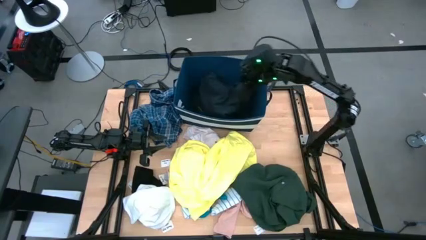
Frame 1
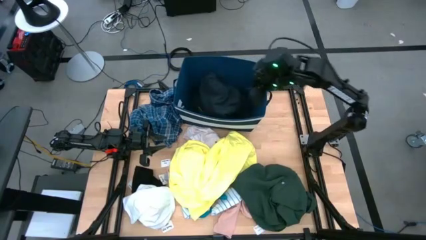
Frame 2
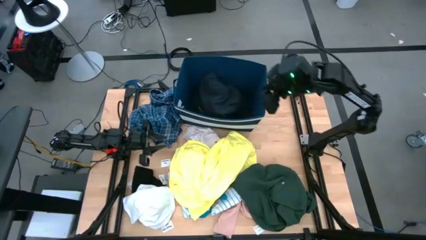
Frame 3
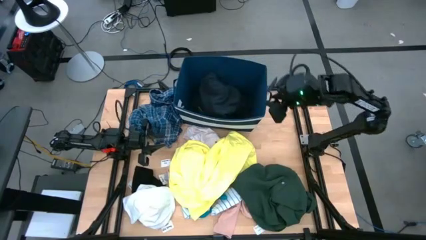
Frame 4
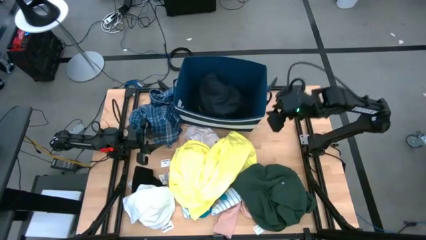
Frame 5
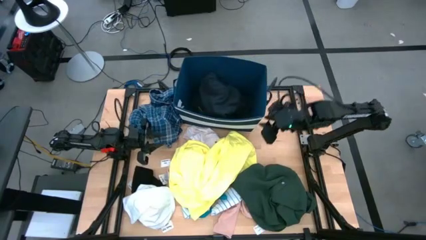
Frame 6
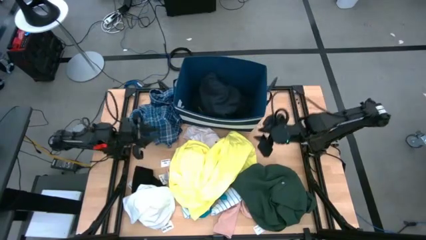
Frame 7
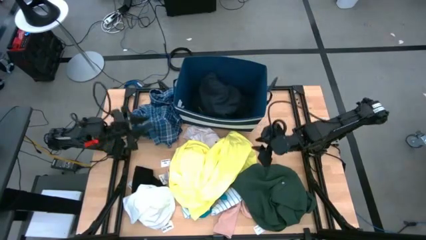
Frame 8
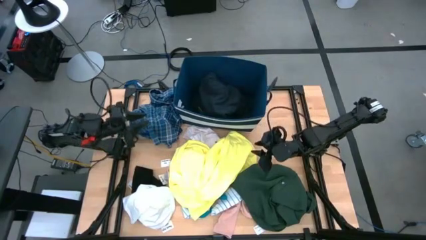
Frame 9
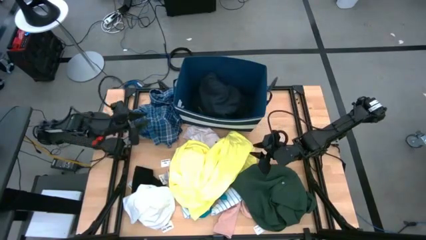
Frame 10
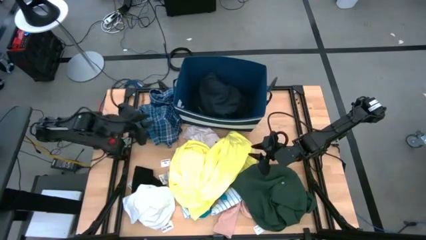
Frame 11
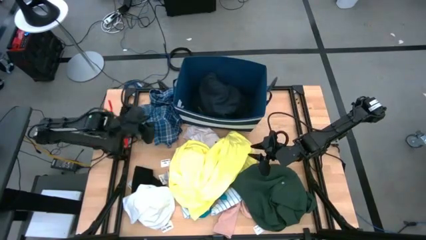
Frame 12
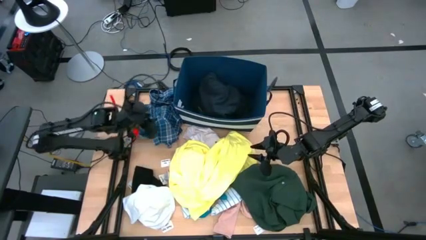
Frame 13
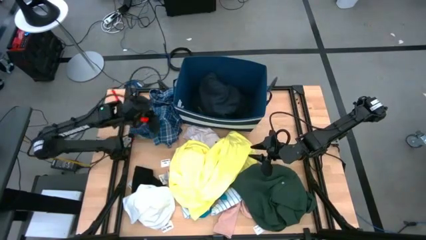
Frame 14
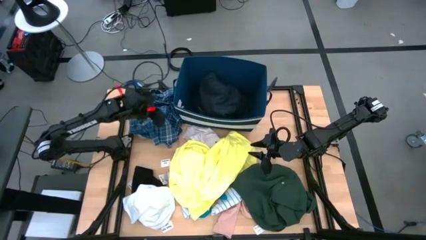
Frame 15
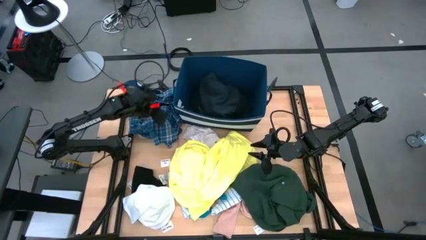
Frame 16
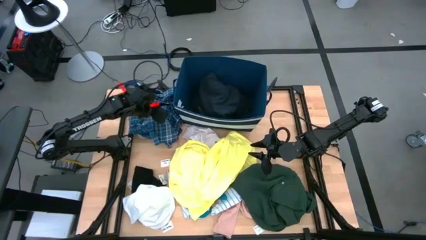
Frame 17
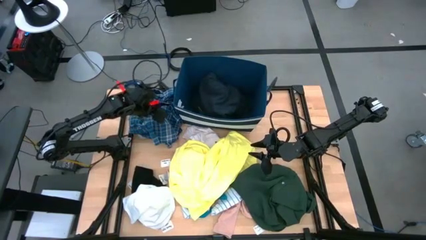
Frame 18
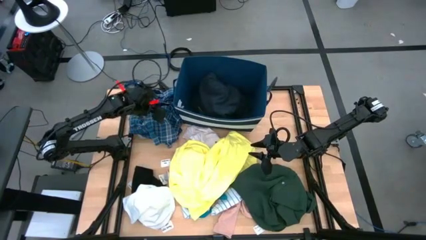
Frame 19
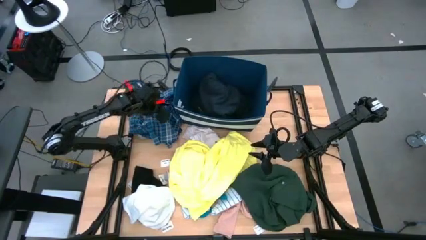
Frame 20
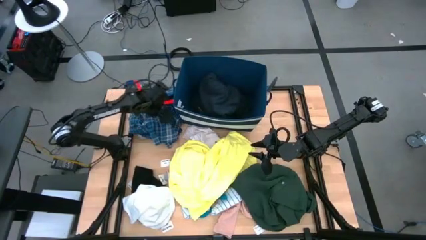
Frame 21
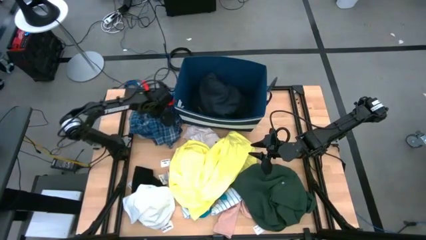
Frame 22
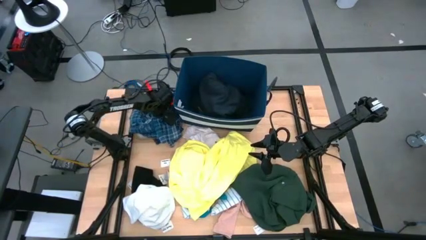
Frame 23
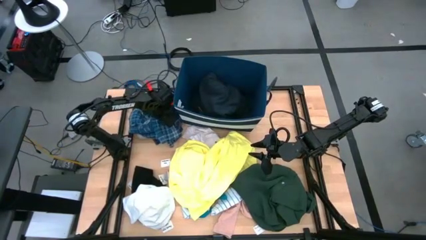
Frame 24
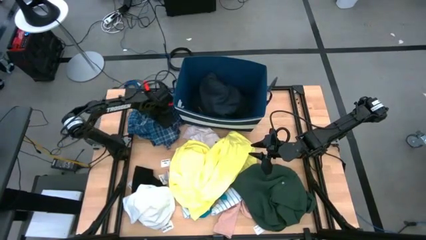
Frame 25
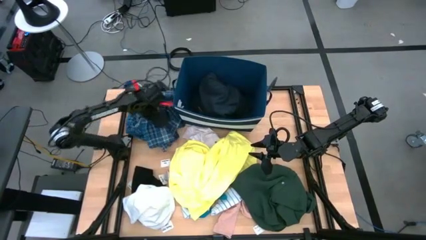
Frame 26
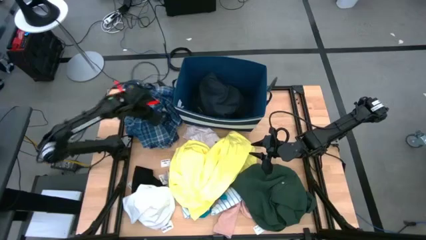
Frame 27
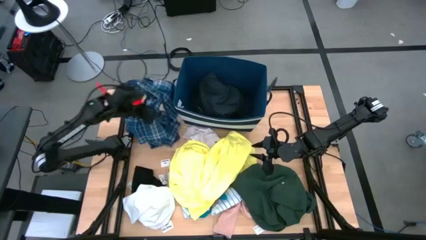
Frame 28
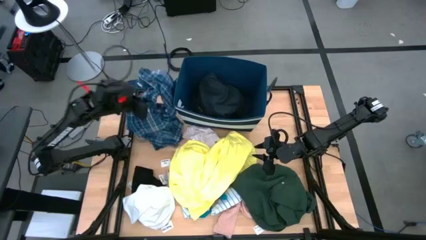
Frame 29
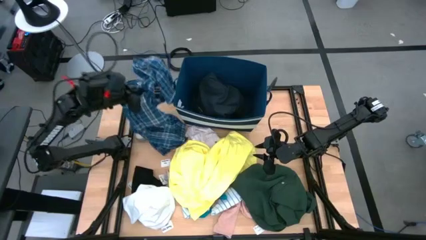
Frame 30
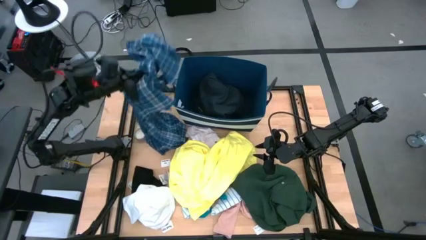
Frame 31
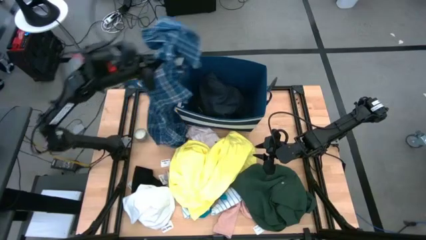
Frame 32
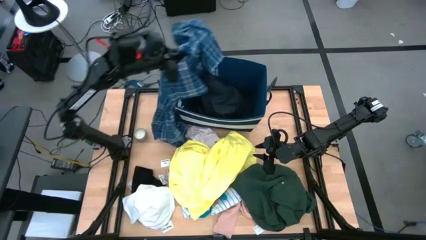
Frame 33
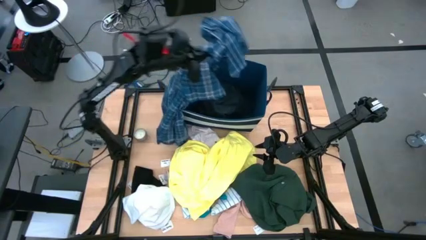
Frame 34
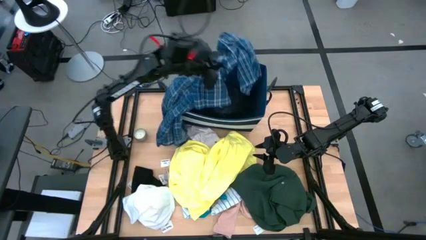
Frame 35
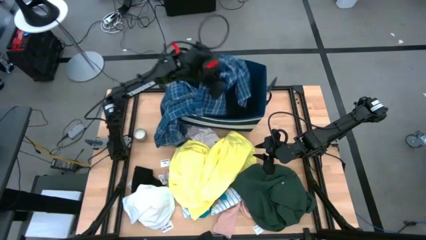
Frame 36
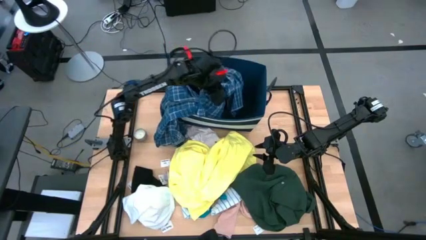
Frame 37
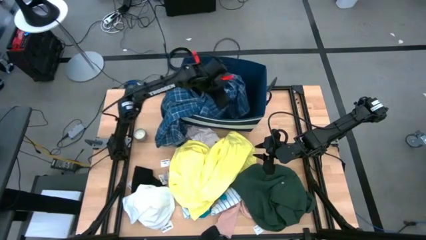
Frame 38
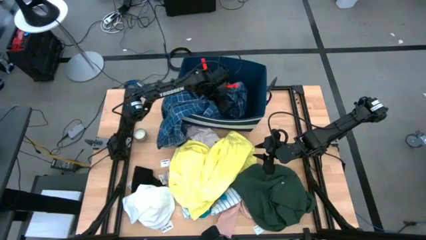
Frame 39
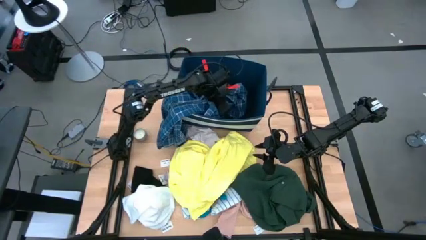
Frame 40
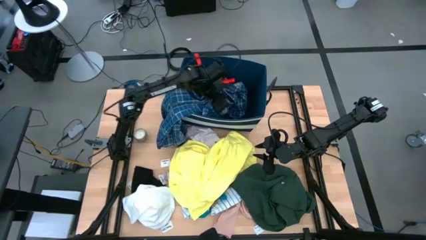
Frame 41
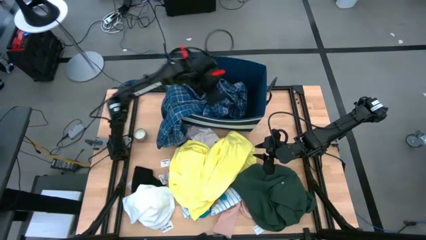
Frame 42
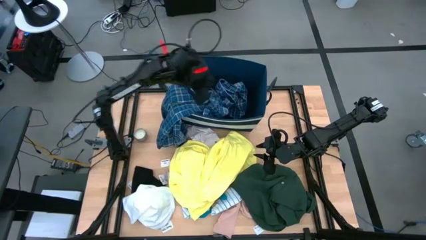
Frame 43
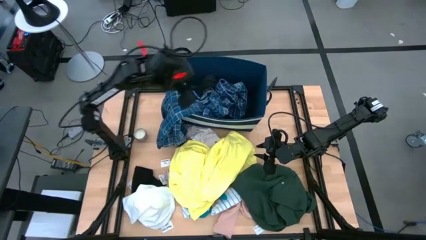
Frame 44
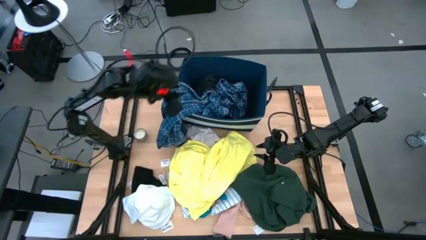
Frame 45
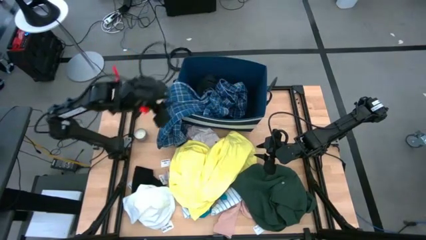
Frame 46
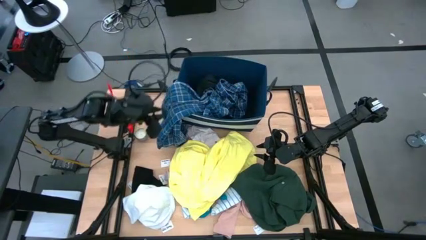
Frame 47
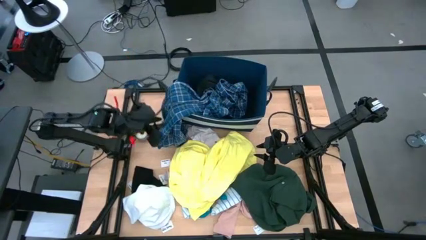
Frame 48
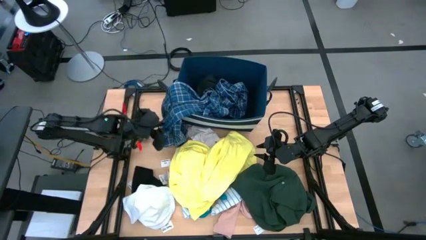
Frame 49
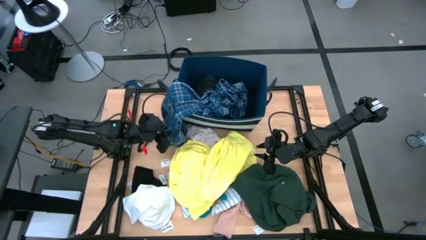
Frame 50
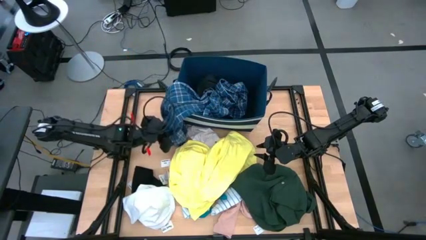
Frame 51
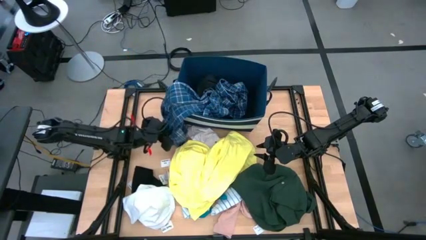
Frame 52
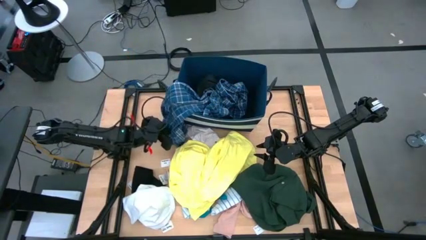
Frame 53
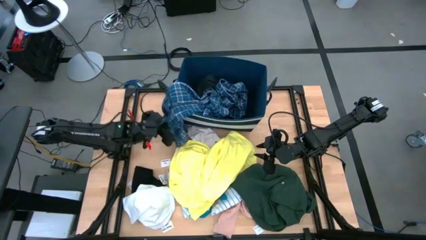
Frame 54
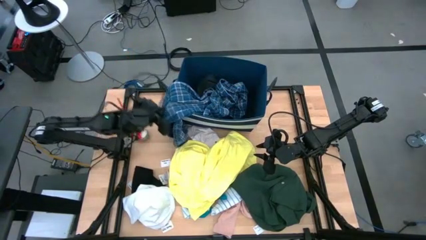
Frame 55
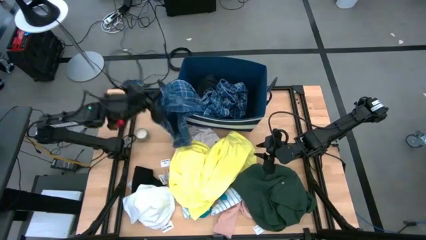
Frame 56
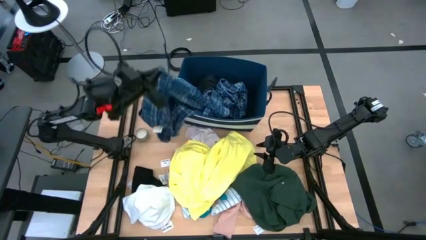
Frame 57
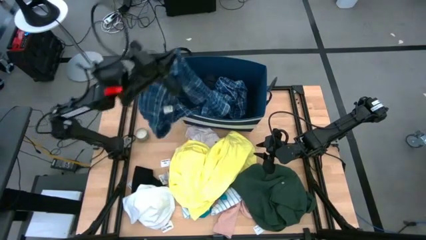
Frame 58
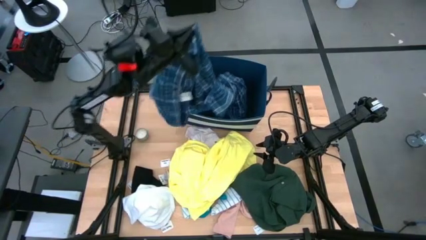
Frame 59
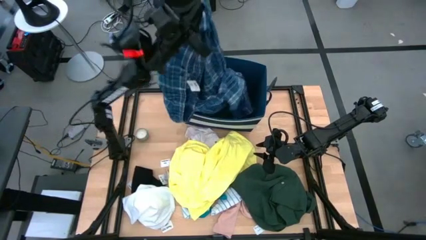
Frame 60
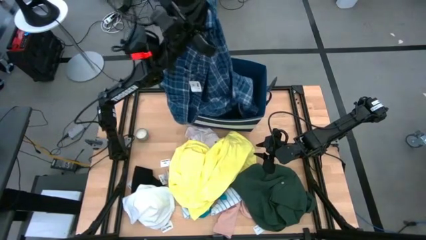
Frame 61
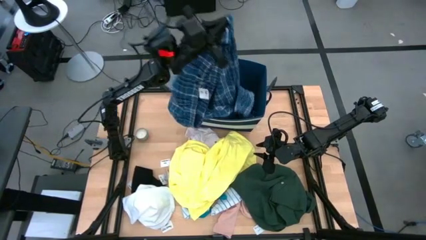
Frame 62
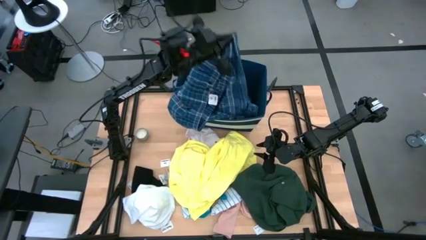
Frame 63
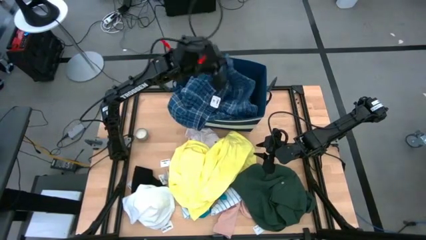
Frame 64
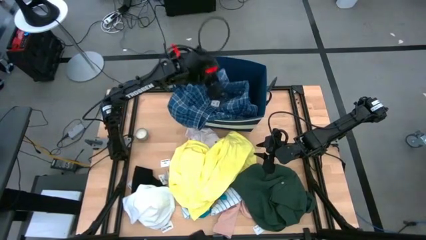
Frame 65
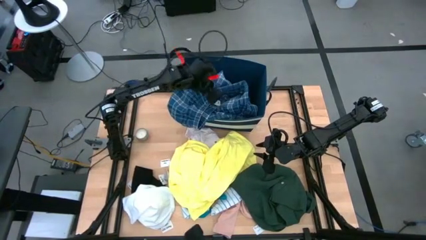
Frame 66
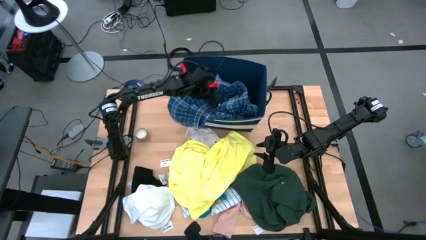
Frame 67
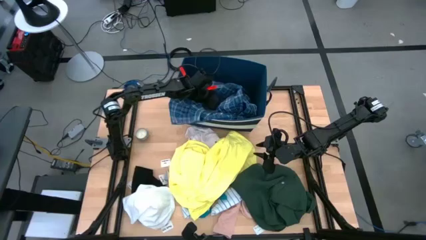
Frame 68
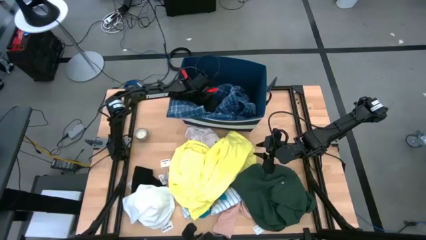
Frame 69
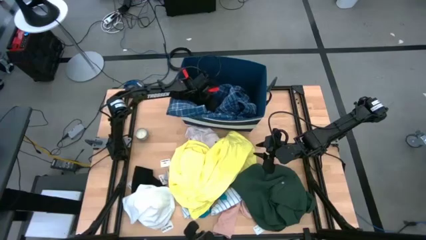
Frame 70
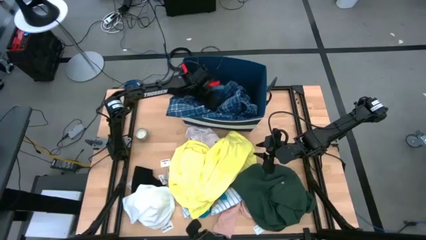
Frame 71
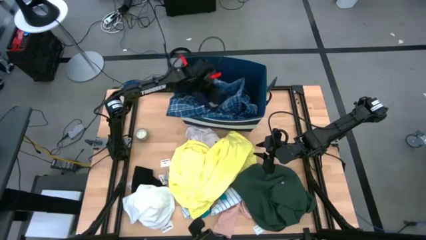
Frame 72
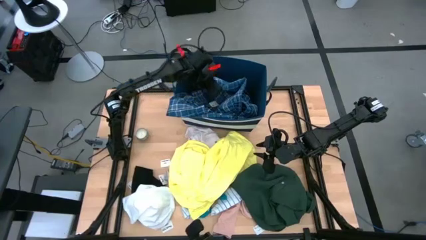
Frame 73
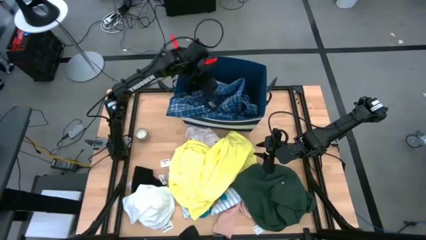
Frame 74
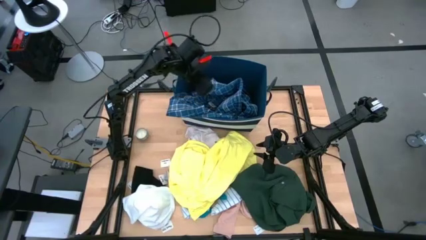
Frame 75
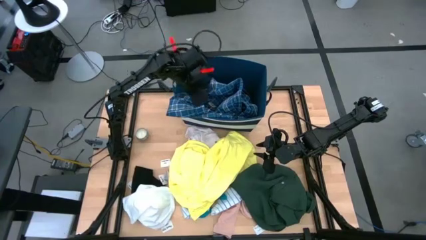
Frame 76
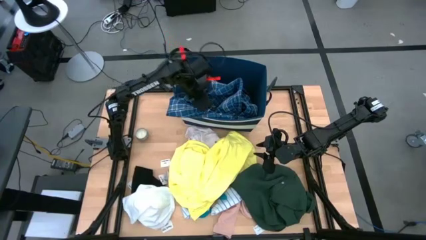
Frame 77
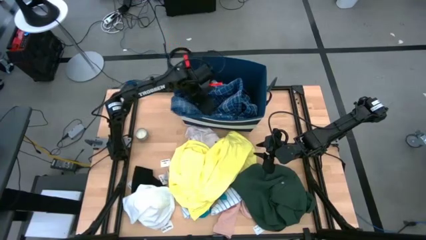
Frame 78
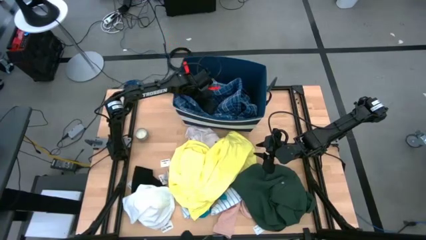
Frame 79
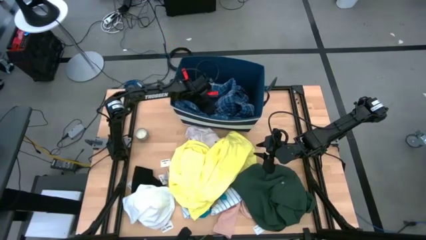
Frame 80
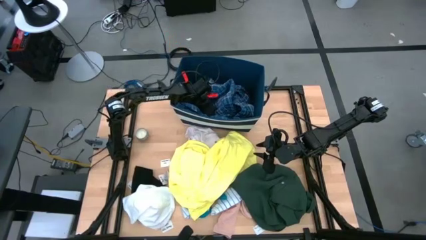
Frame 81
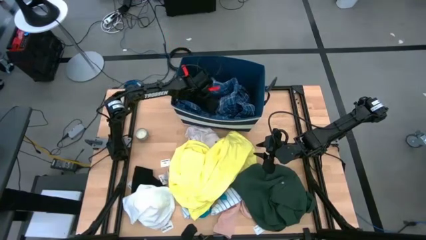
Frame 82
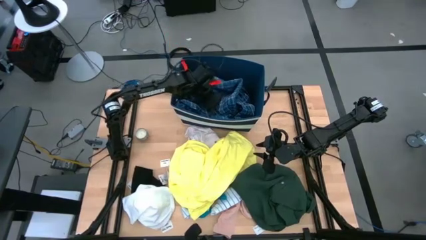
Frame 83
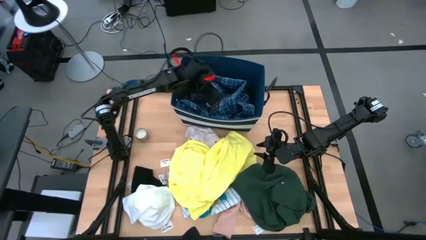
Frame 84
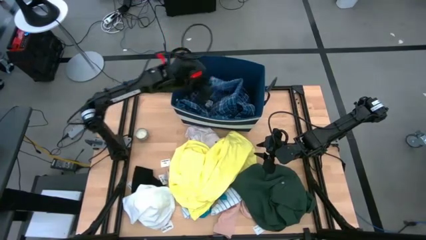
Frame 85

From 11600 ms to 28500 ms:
Task: Sort clothes
Put the blue pants into the blue laundry bin
